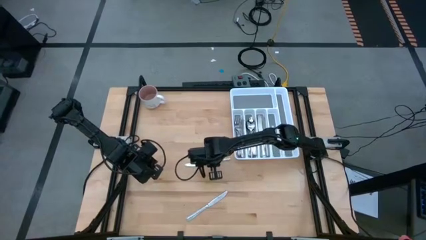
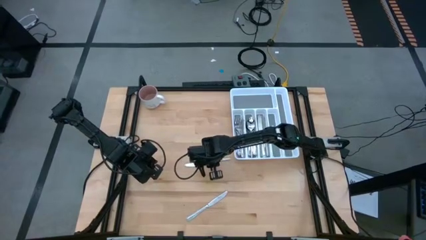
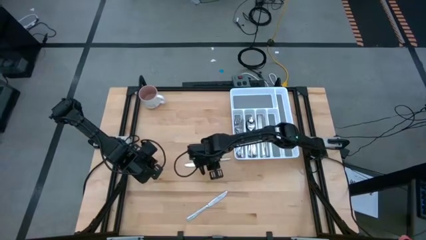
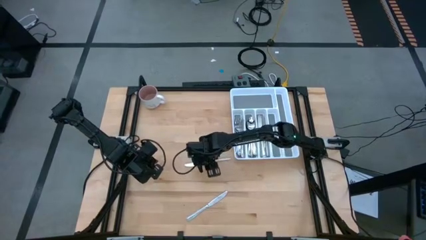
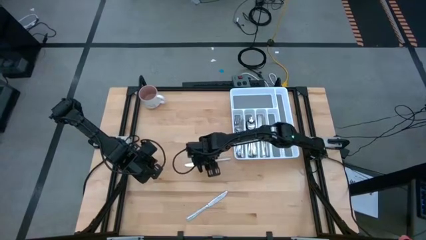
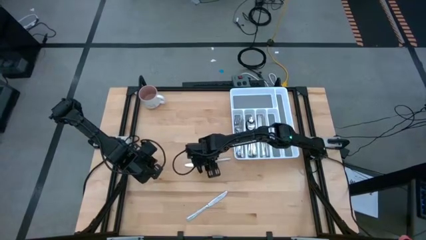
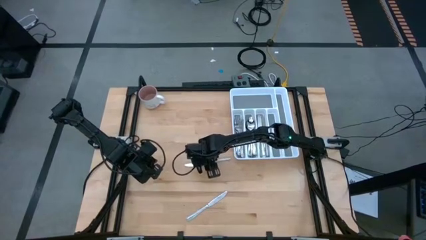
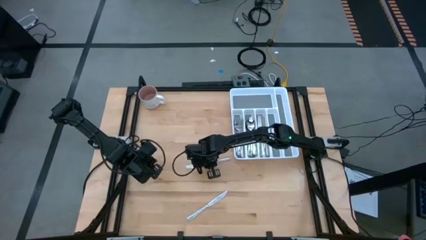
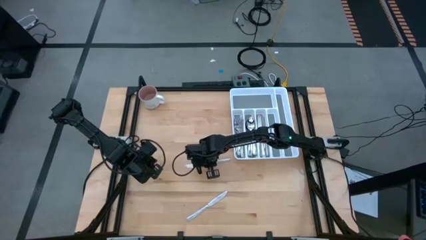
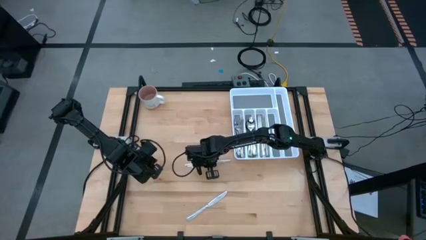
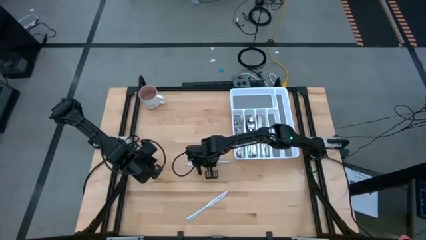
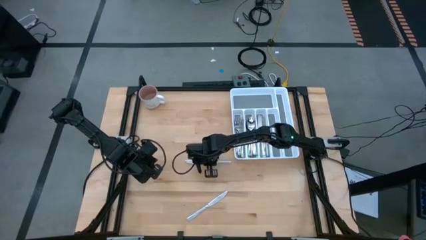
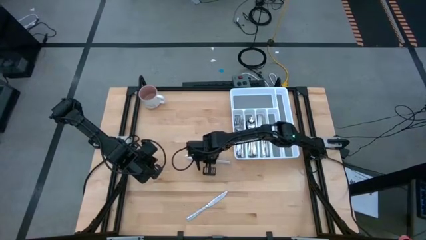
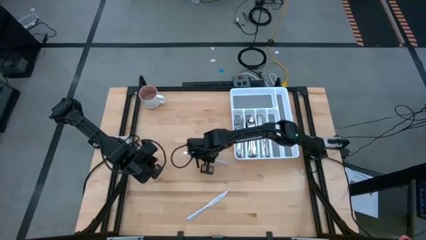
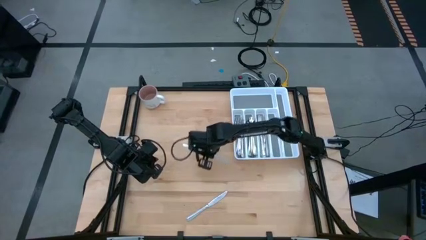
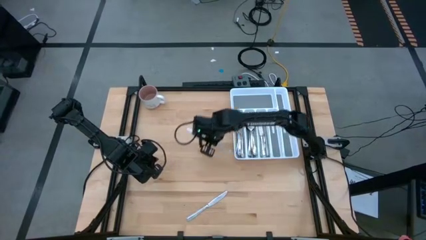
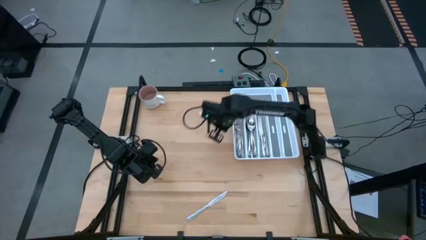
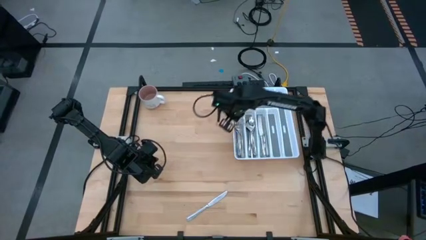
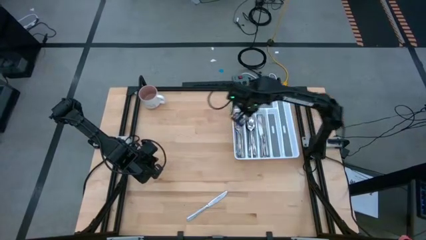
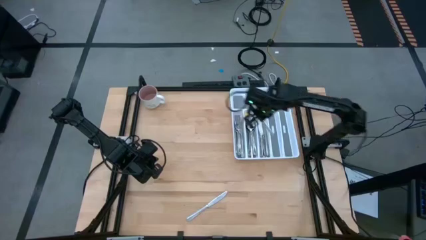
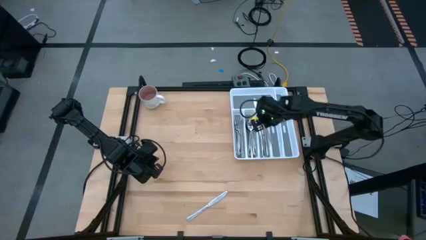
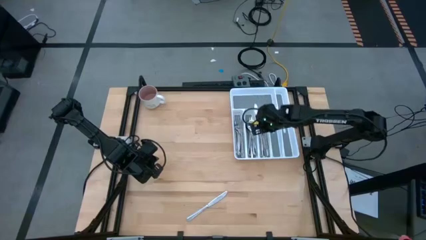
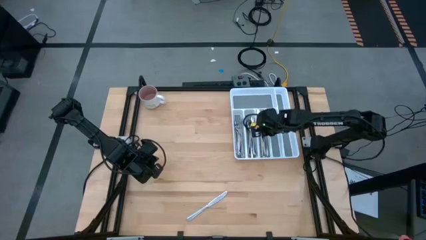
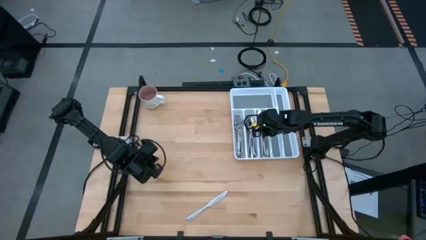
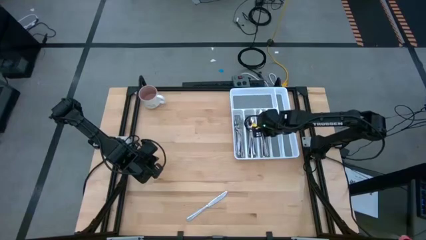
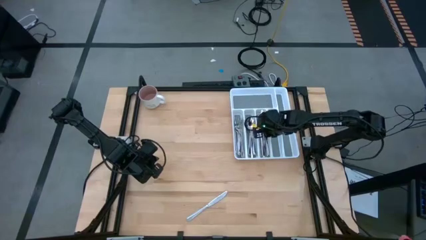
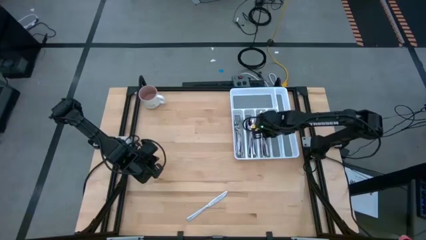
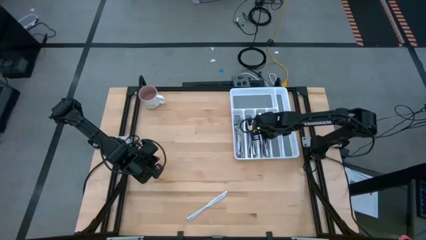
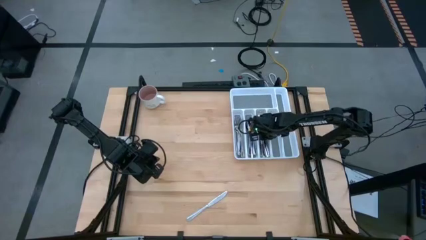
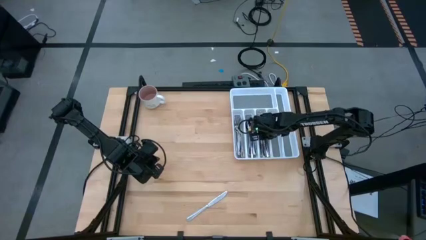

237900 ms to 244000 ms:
Task: Sort silverware
Put the silver table knife into the silverware tray

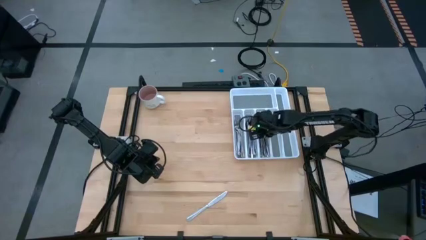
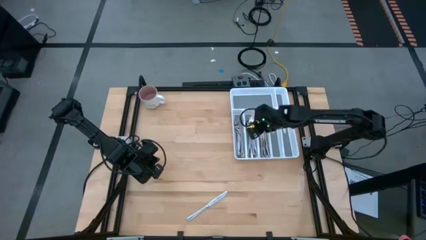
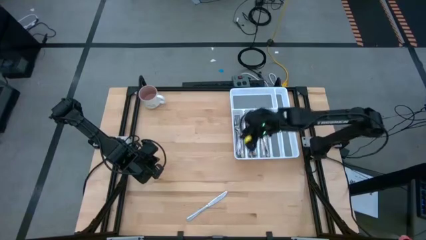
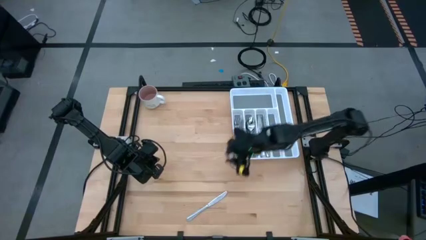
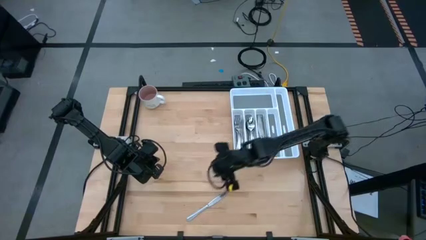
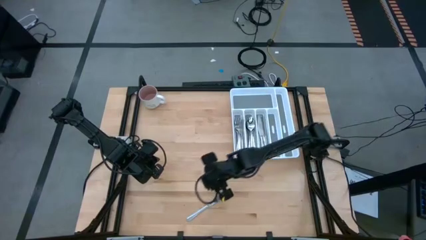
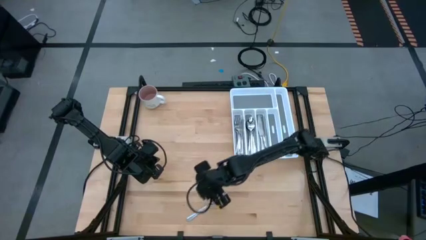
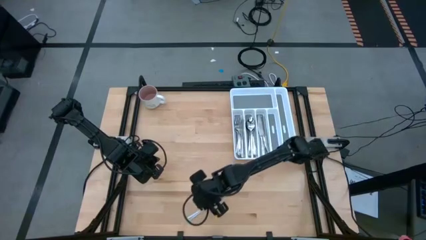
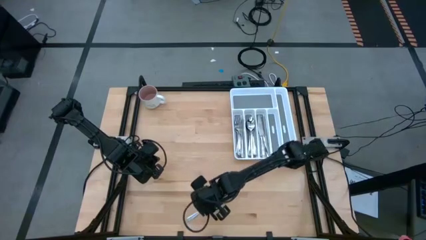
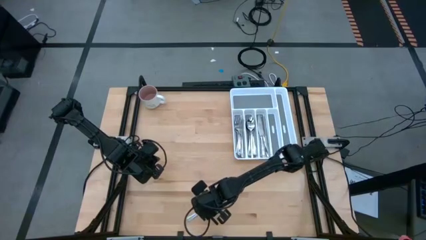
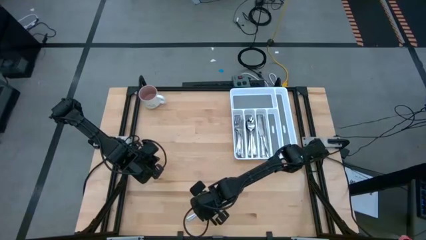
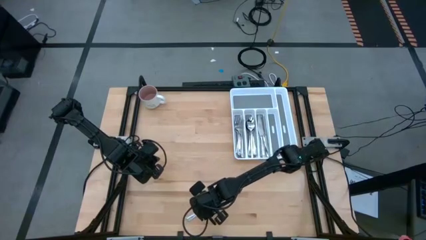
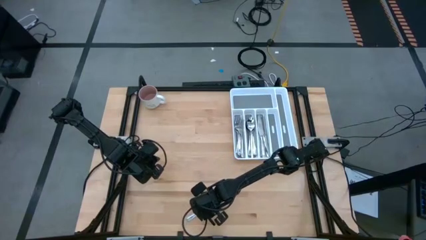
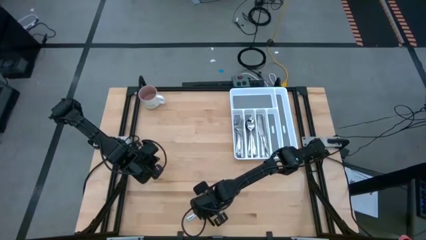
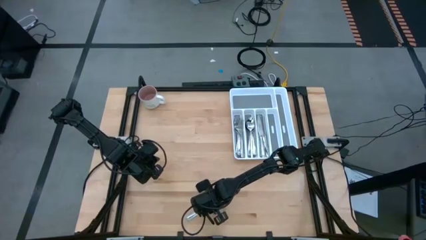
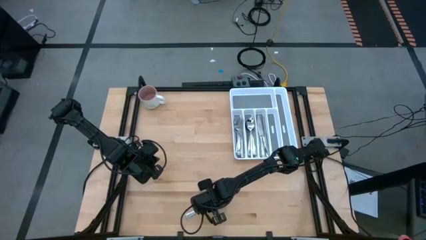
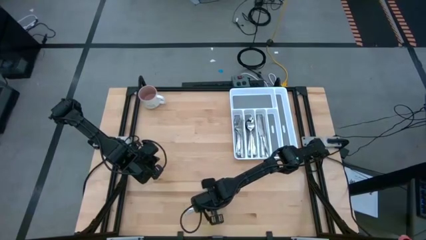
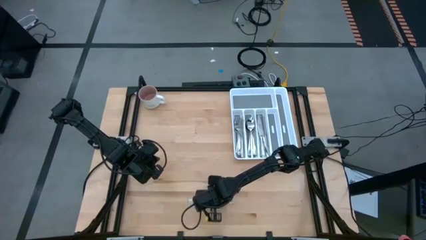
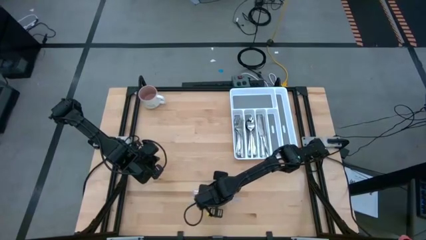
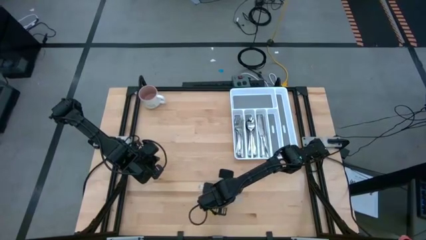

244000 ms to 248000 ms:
Put the silver table knife into the silverware tray

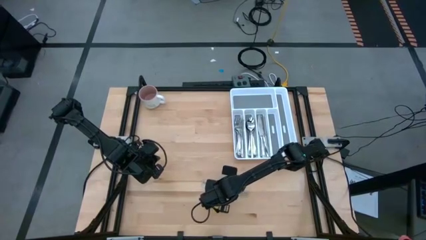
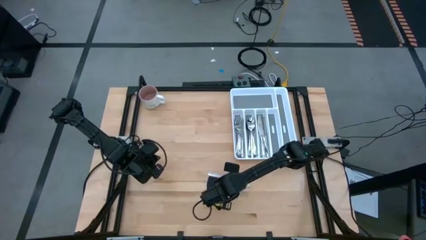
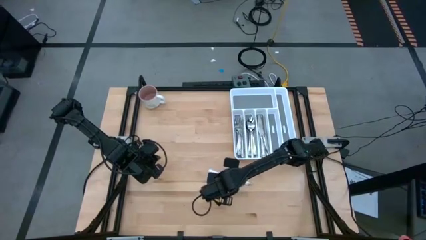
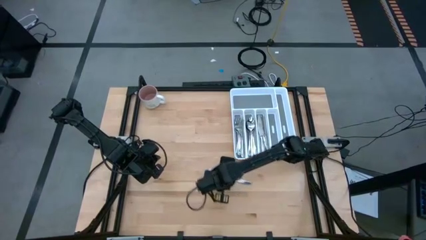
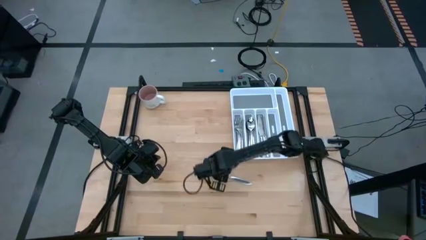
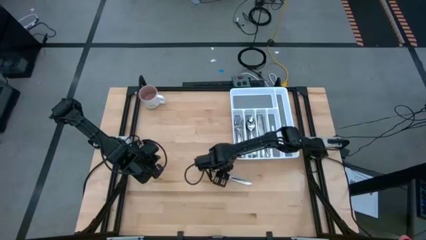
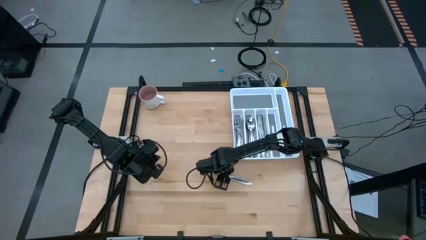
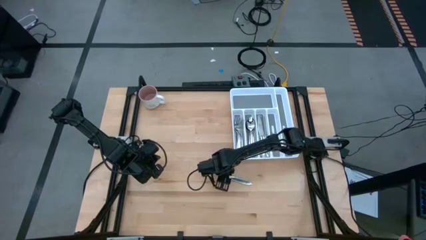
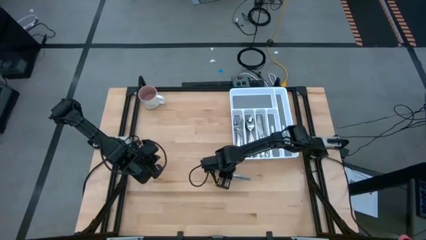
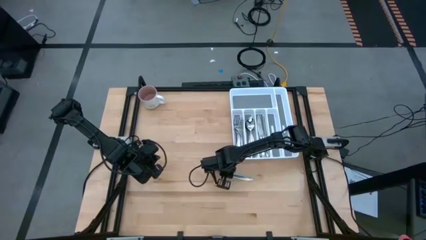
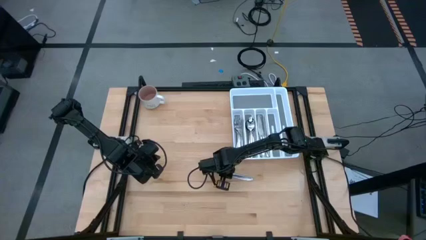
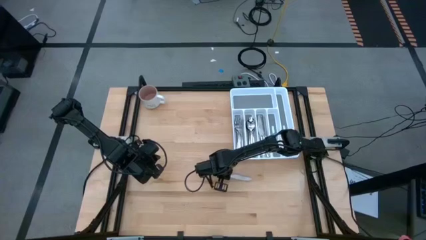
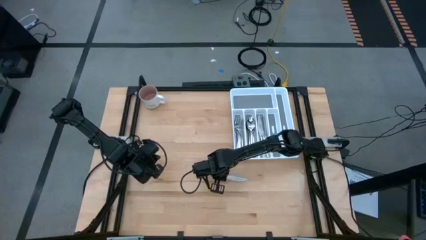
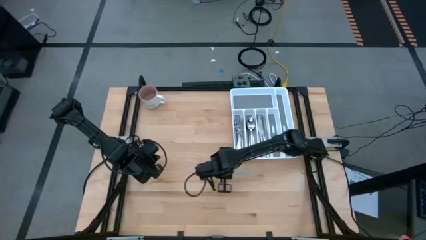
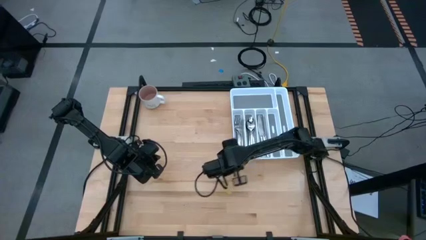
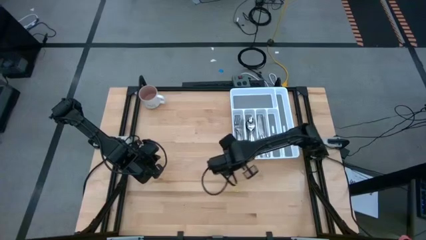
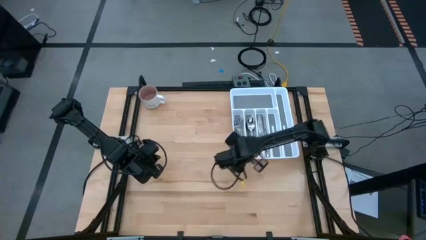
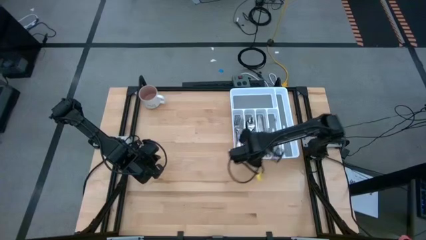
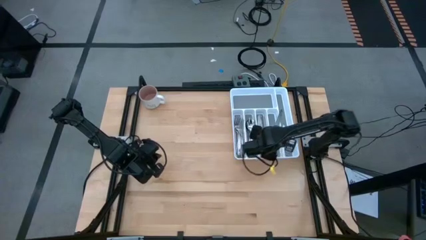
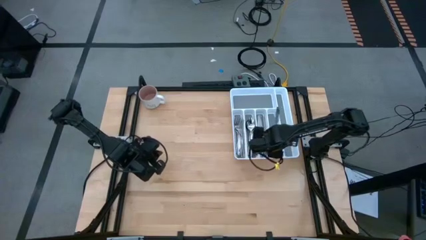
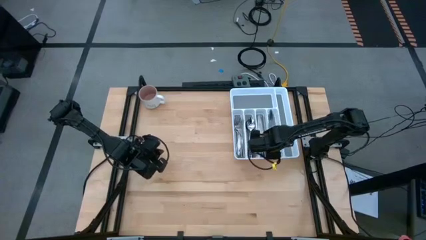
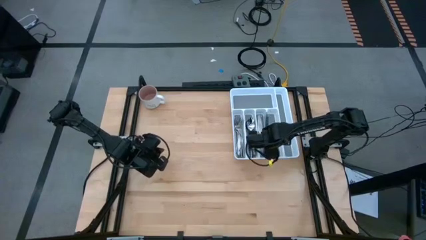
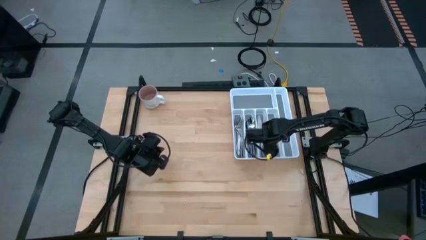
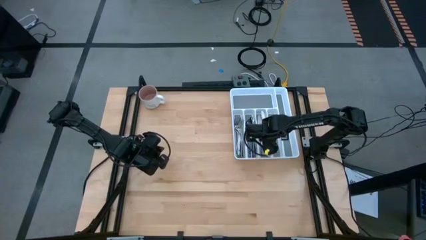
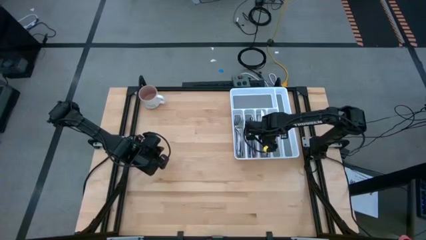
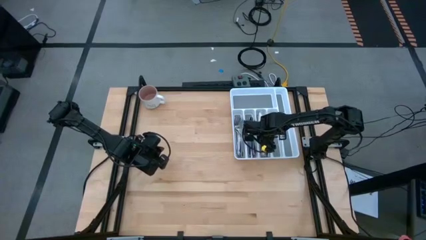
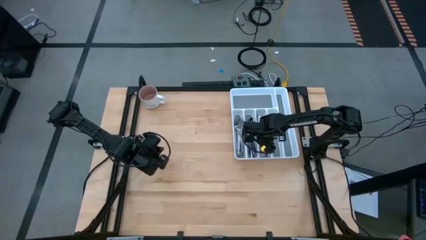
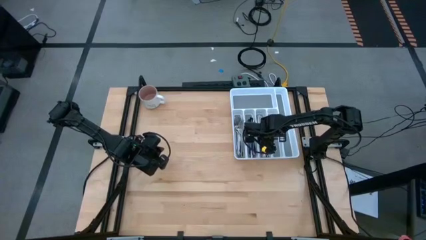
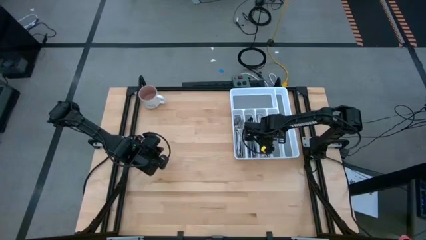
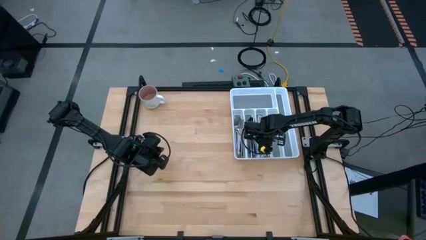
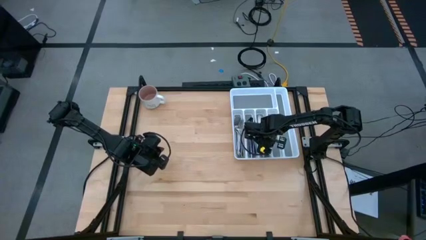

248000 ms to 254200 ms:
Put the silver table knife into the silverware tray

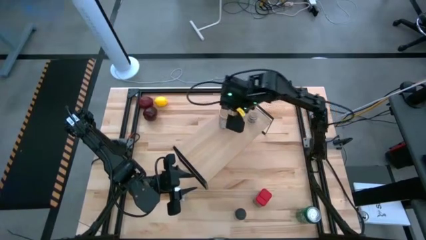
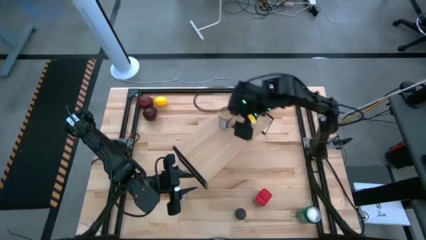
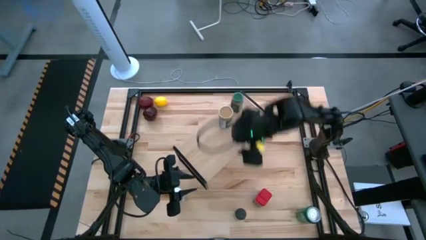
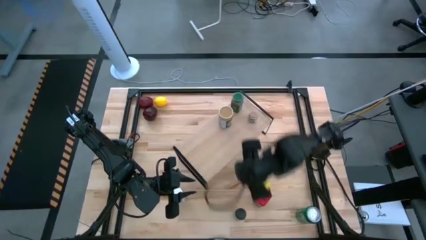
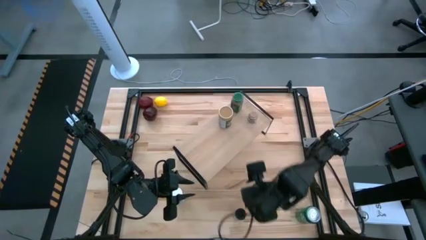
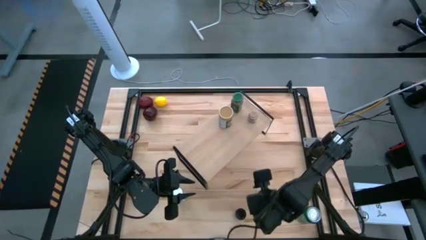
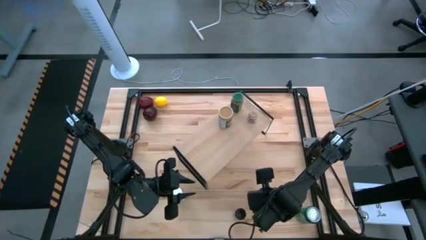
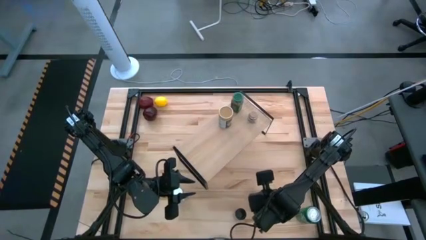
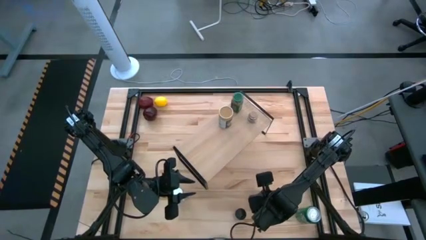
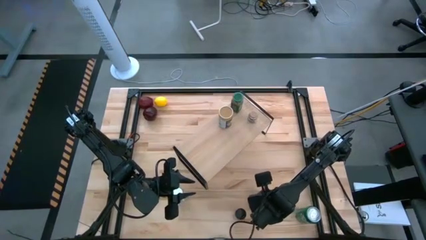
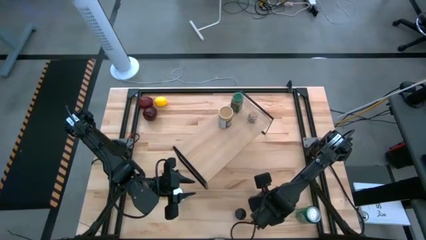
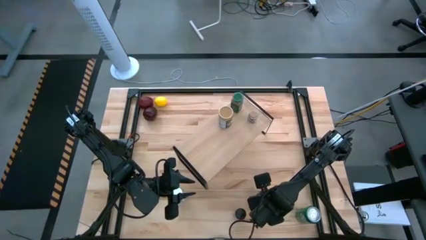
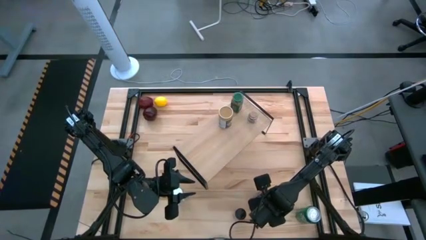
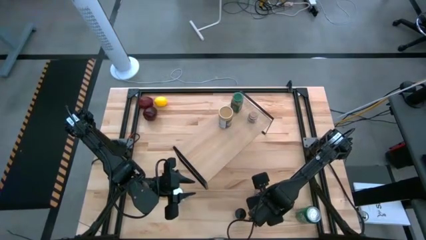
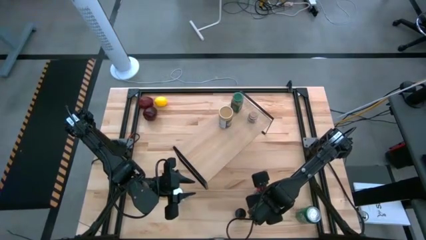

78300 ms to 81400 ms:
Task: Shelf spices
Put the red seasoning can on the shelf
